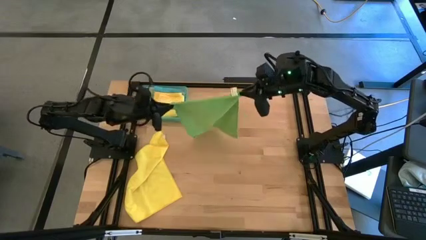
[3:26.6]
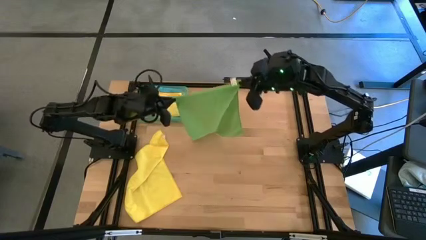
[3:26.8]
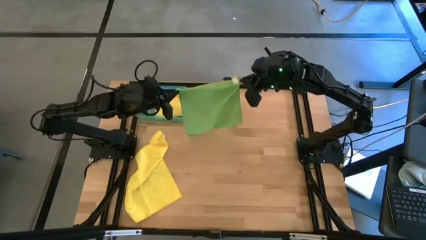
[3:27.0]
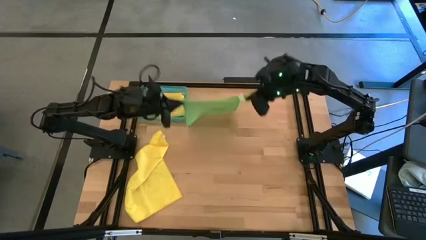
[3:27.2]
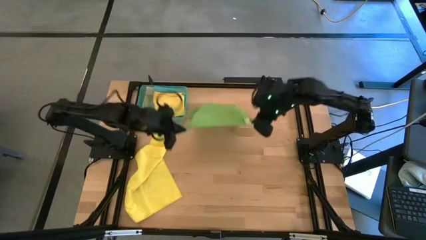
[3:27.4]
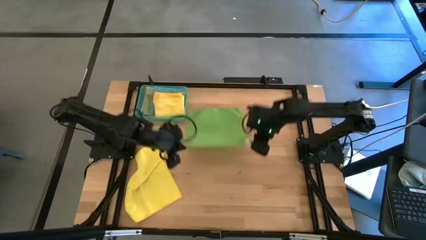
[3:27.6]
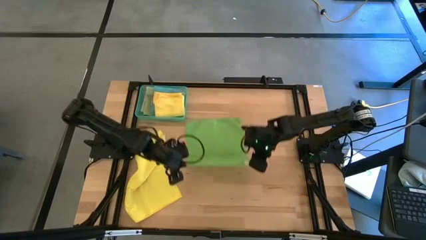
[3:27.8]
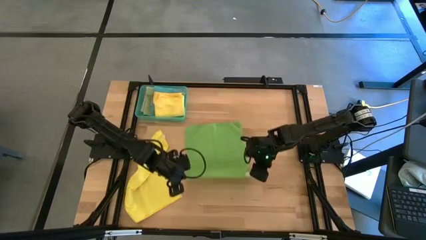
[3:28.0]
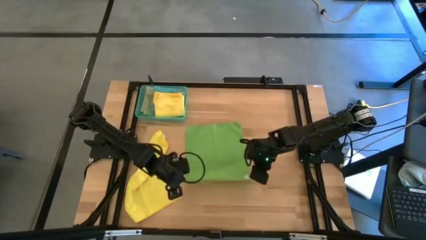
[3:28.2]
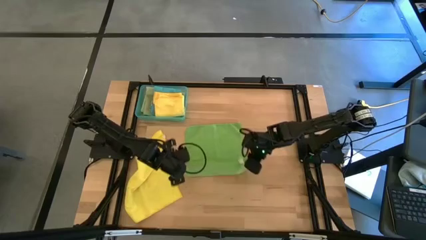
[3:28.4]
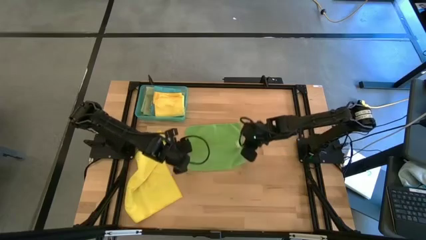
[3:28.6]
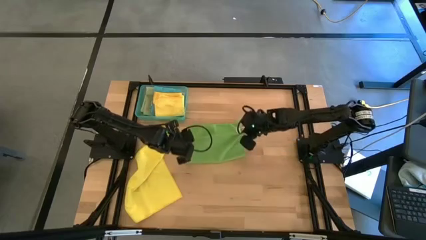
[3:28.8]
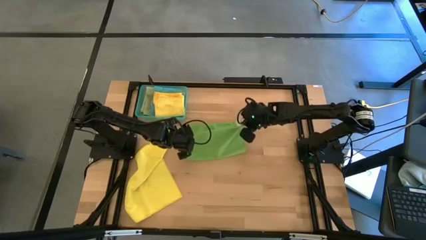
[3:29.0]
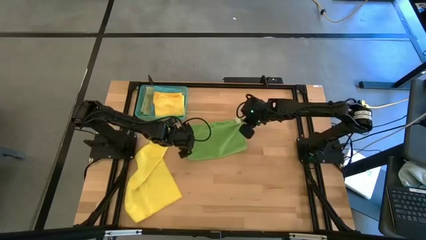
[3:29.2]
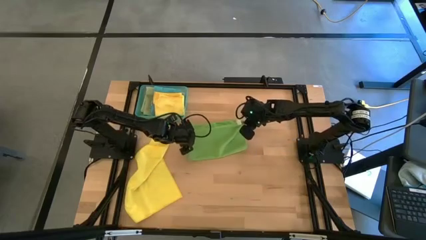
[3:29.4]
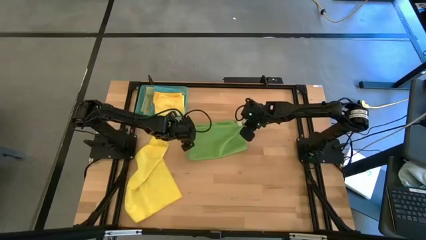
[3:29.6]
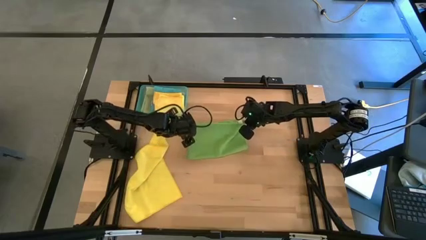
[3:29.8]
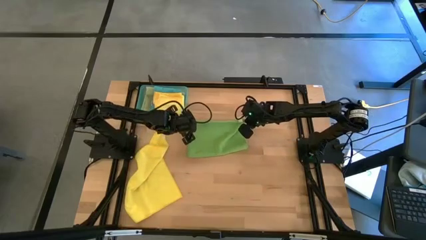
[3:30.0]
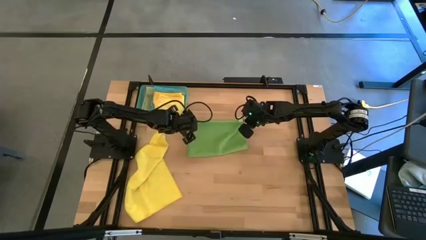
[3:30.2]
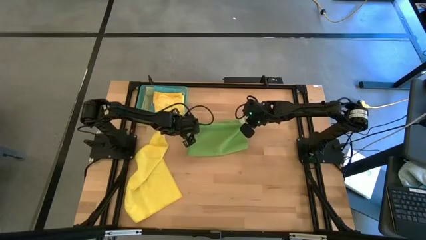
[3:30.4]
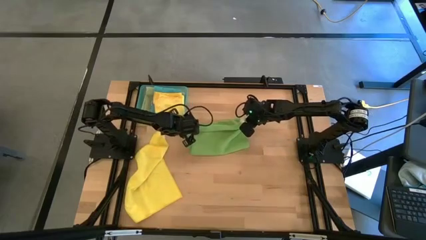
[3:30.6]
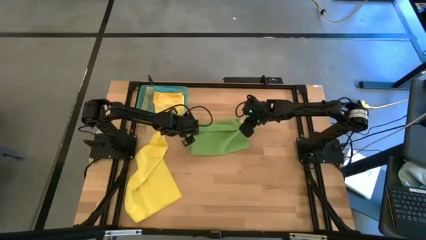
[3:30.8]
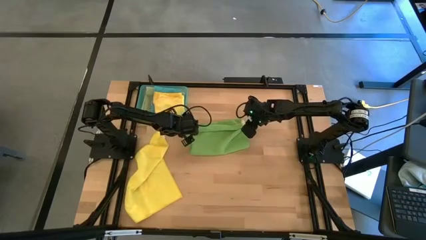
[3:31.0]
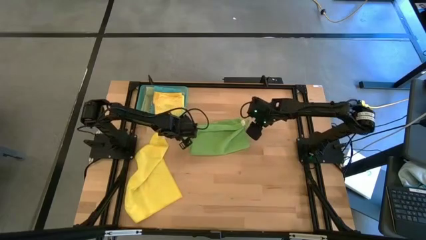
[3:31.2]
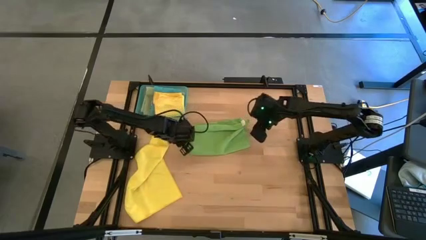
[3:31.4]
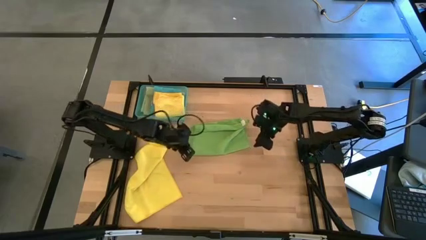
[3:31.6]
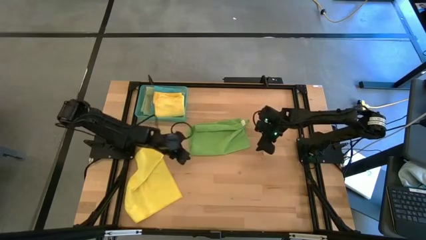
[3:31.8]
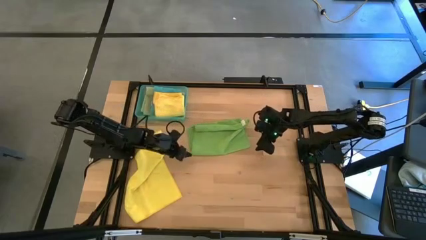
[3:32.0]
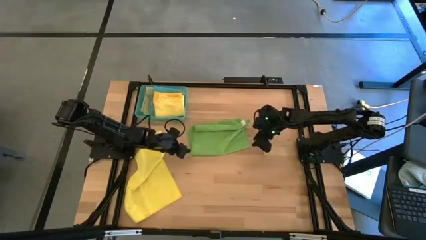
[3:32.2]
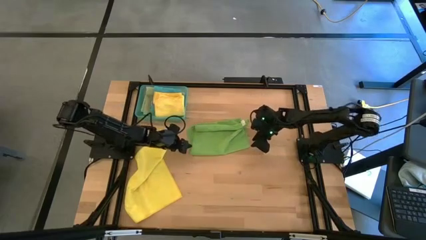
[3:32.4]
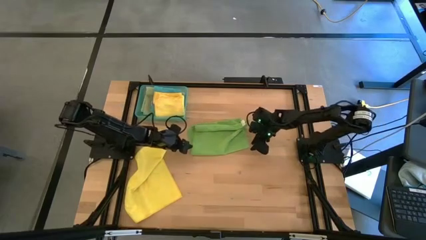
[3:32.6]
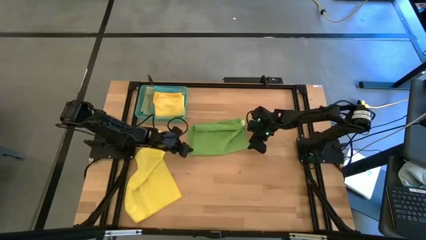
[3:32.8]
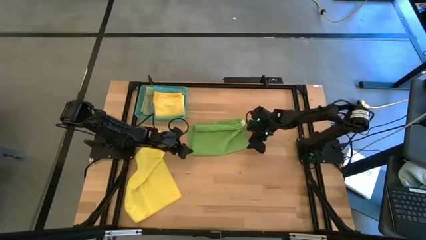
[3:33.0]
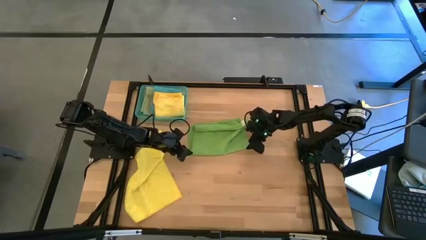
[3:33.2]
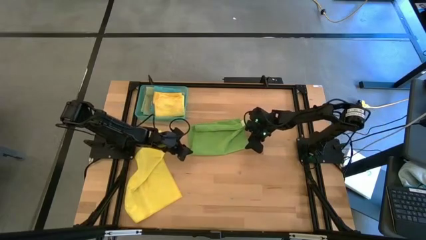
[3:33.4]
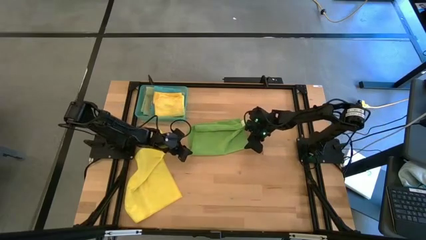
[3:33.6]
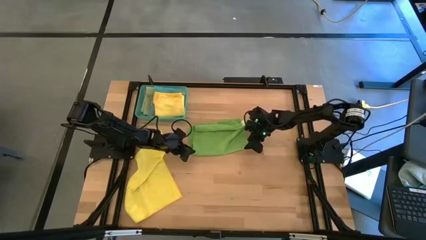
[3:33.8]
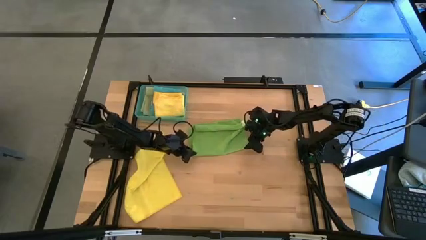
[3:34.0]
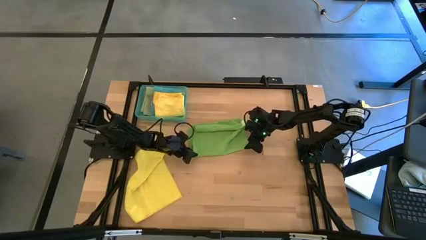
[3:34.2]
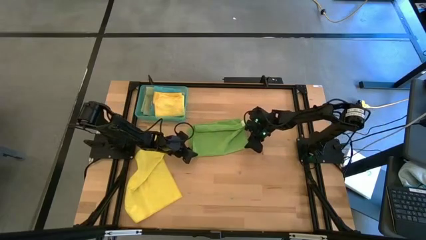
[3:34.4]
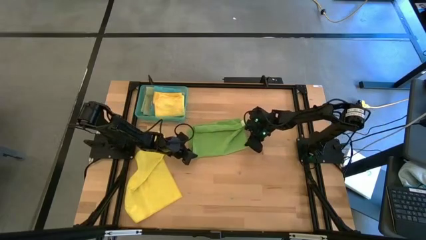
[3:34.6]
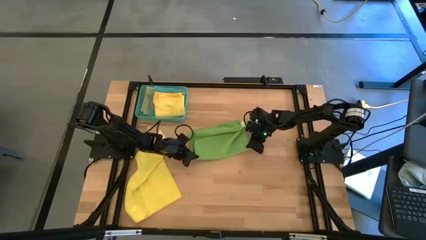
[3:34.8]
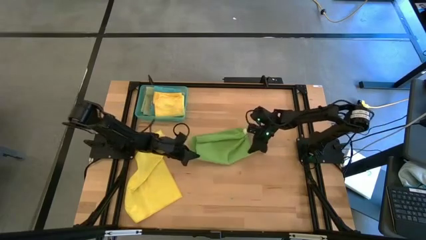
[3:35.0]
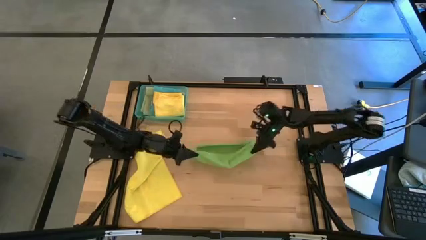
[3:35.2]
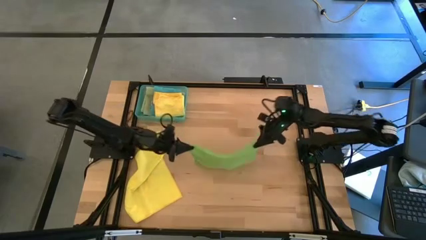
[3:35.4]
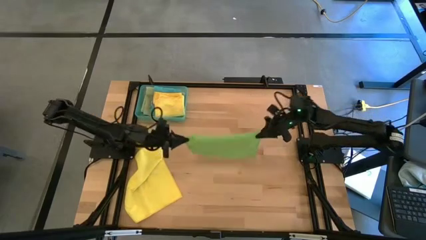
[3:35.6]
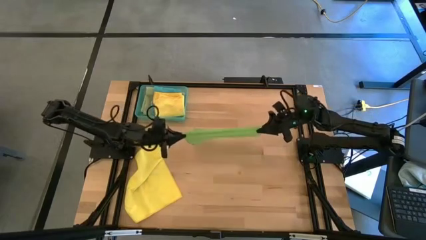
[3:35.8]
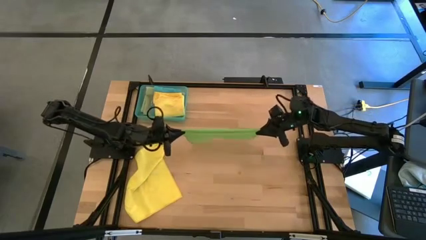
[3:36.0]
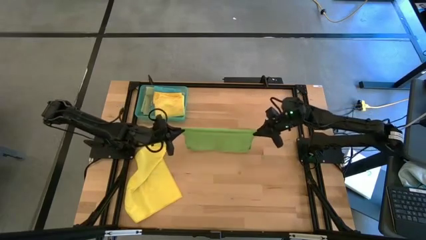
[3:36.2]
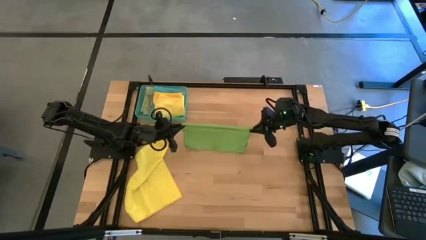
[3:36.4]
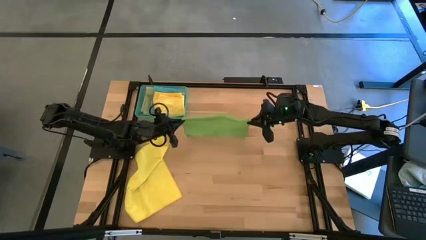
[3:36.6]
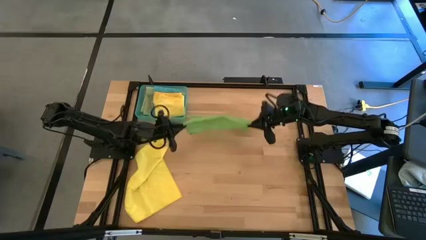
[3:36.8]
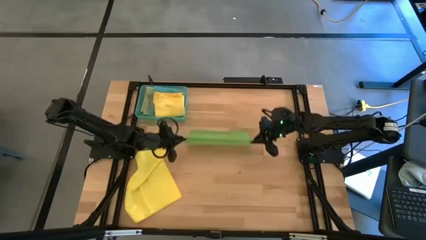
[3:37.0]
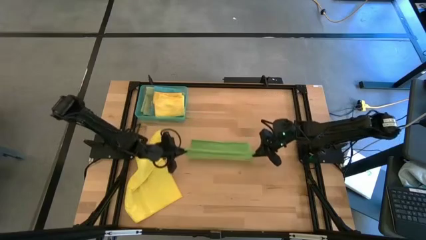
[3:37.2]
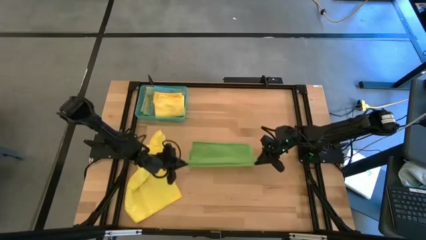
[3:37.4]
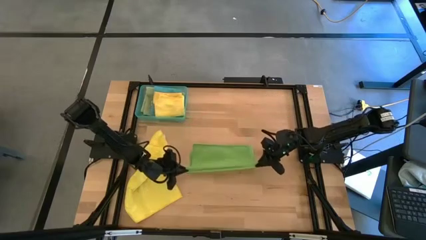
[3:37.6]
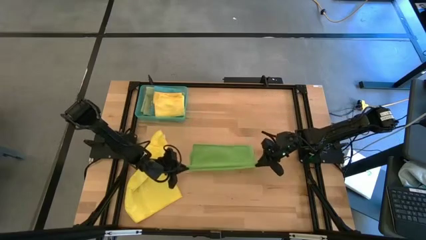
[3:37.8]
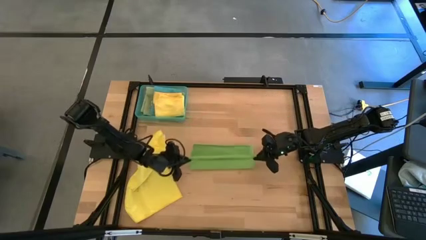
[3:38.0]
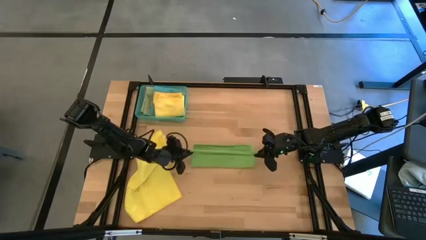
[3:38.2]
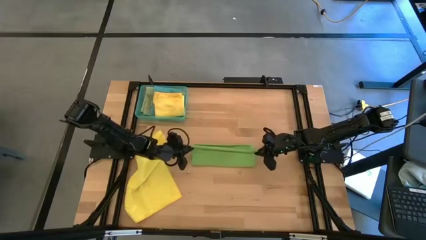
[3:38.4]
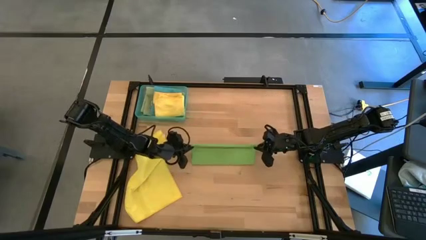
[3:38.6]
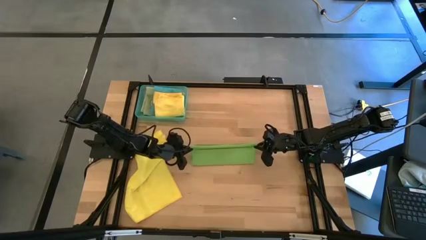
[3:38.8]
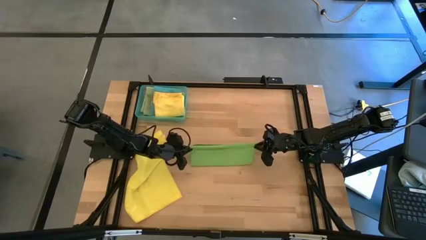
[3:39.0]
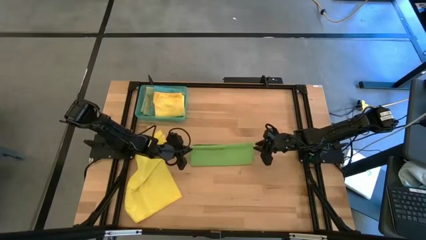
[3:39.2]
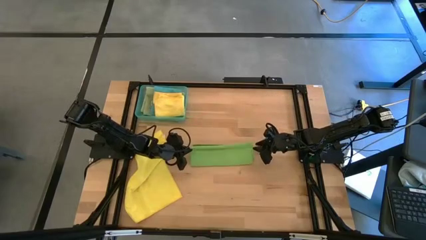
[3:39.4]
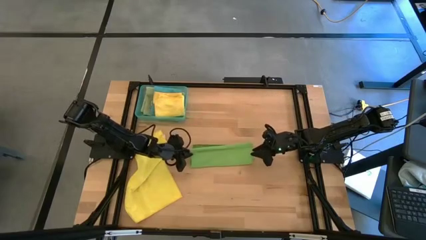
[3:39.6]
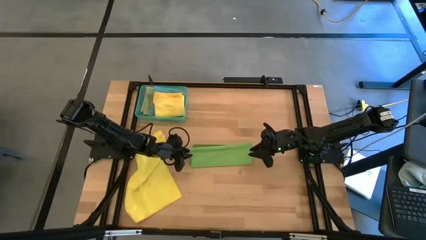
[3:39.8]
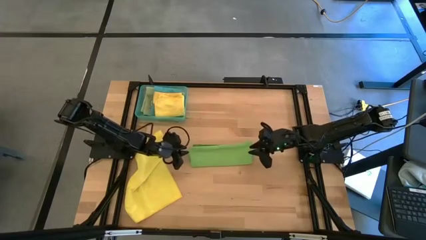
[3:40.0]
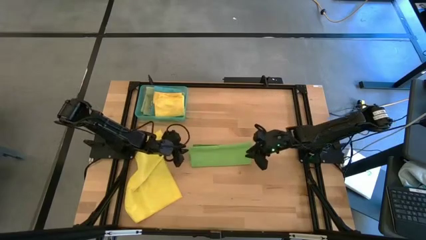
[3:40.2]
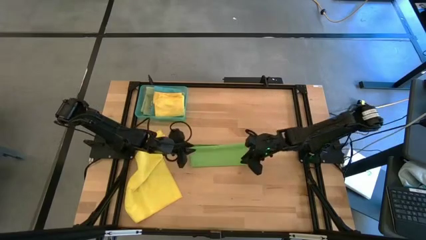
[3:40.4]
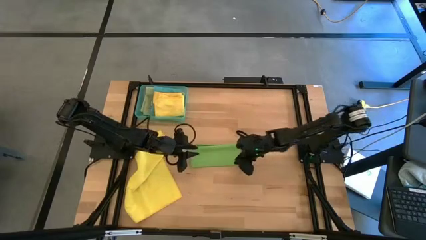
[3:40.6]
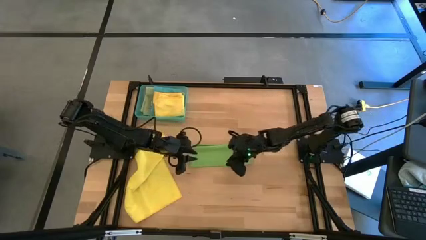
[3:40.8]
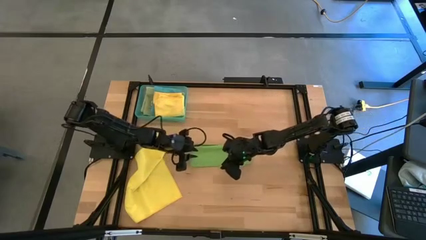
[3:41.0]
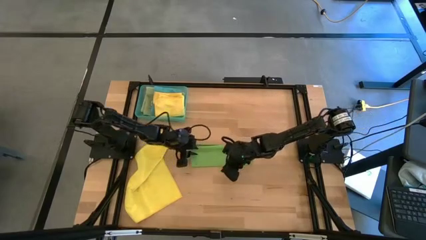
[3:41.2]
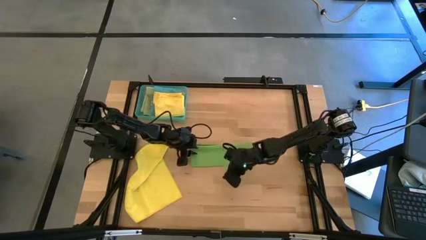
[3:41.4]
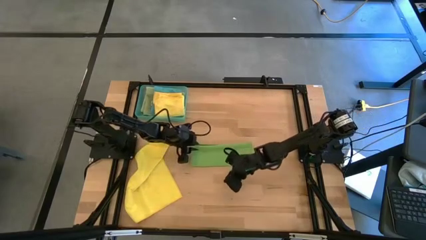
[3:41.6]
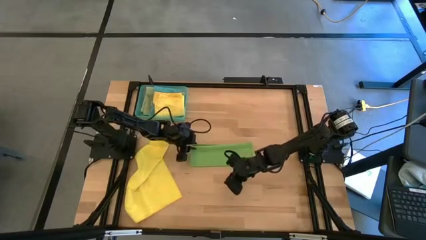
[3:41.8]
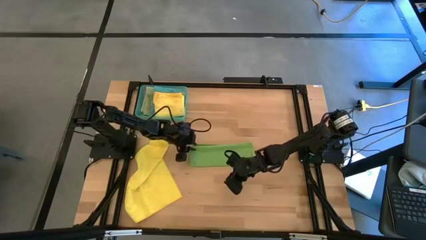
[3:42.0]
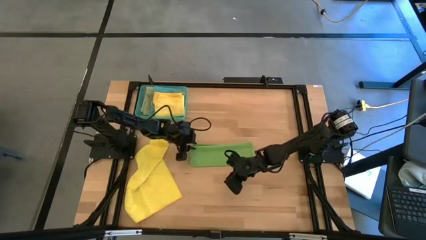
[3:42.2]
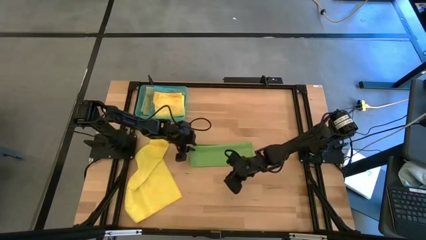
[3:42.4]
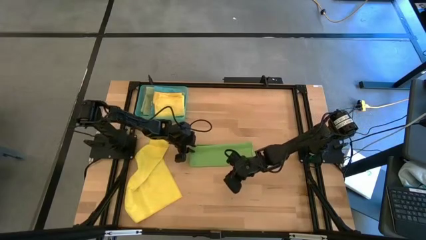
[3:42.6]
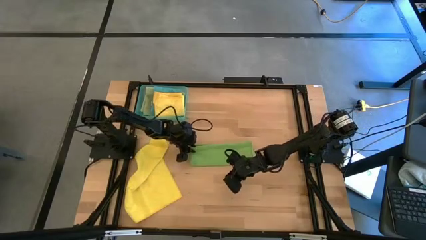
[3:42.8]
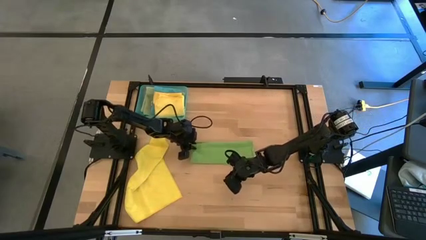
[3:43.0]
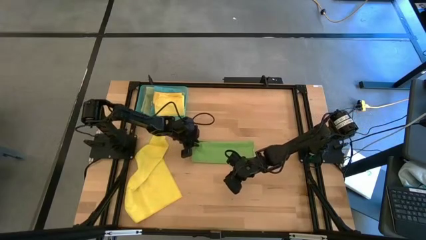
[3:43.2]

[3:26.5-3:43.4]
Task: Fold microfiber towels
Fold the green microfiber cloth
